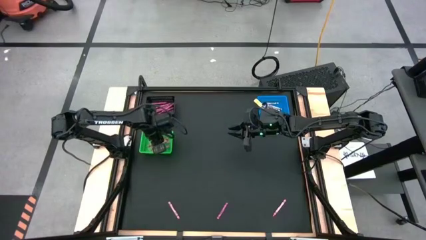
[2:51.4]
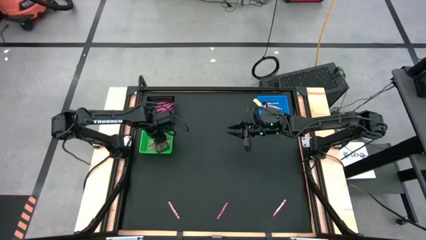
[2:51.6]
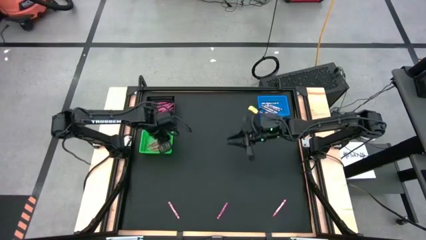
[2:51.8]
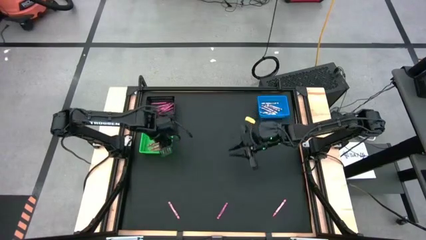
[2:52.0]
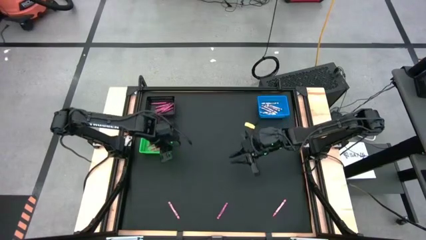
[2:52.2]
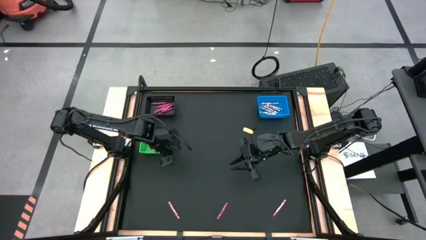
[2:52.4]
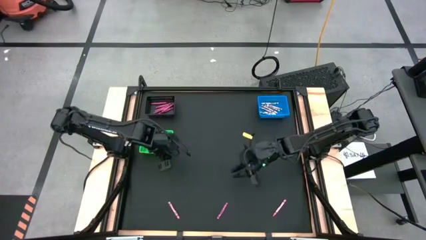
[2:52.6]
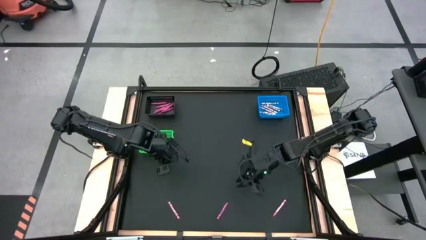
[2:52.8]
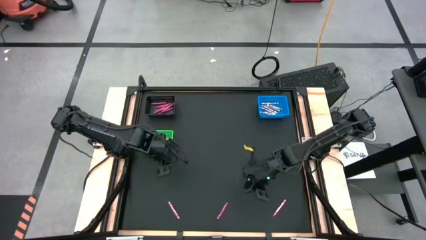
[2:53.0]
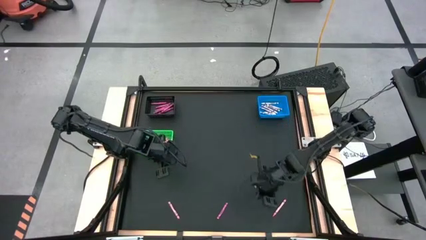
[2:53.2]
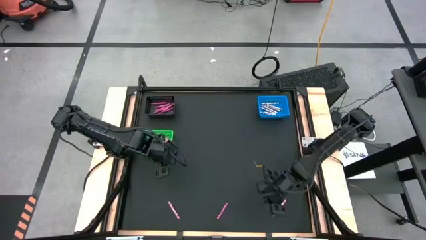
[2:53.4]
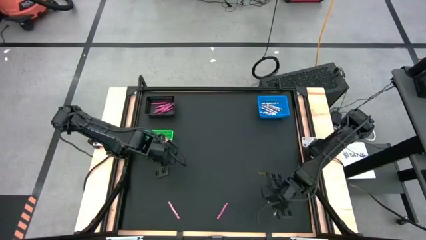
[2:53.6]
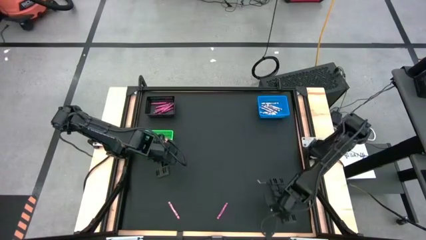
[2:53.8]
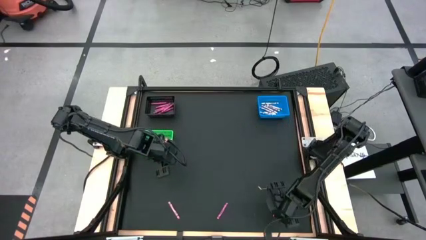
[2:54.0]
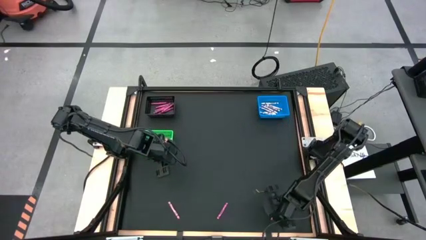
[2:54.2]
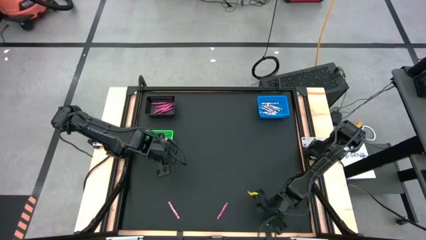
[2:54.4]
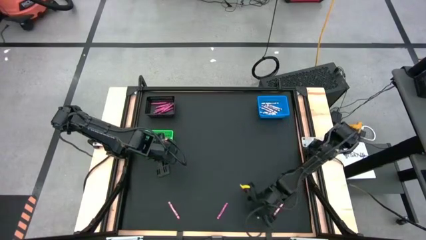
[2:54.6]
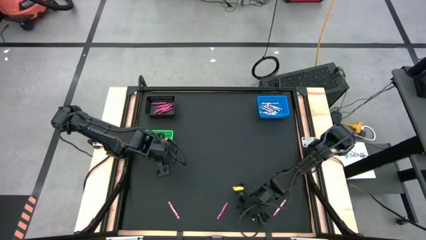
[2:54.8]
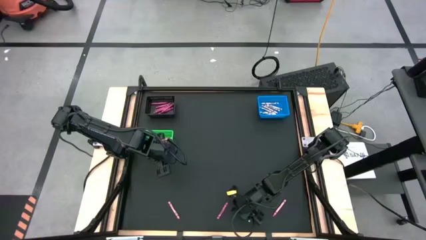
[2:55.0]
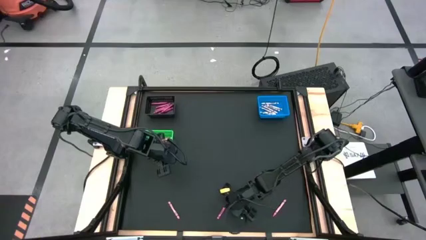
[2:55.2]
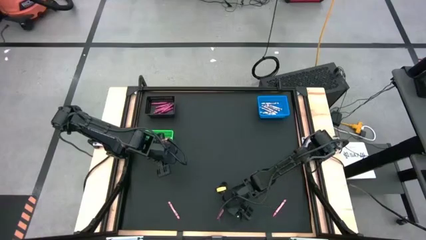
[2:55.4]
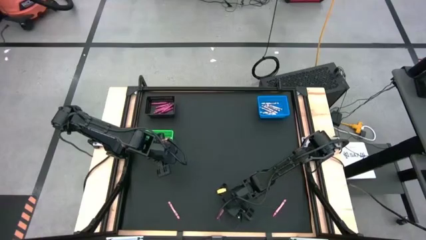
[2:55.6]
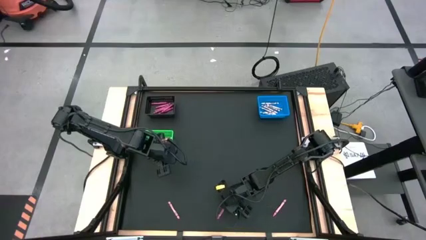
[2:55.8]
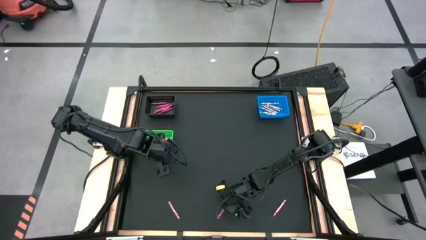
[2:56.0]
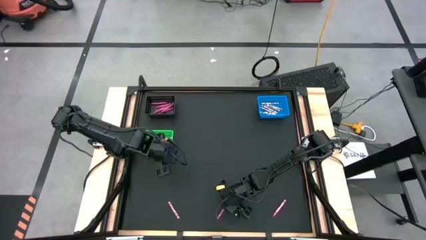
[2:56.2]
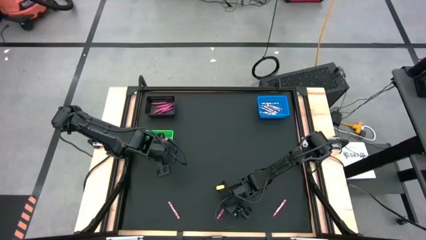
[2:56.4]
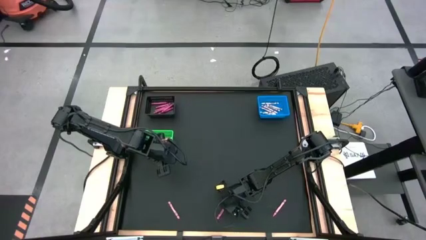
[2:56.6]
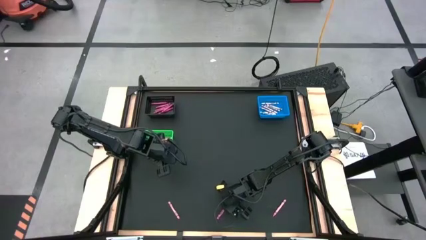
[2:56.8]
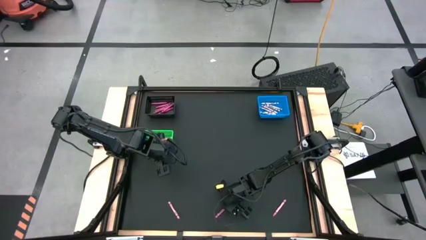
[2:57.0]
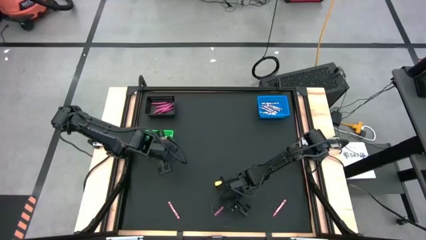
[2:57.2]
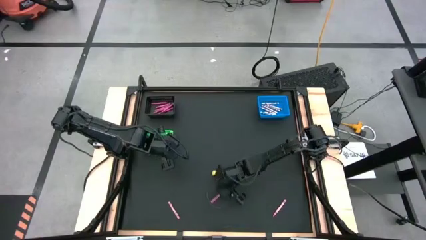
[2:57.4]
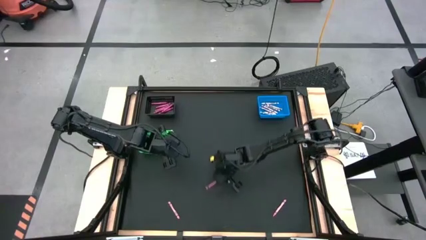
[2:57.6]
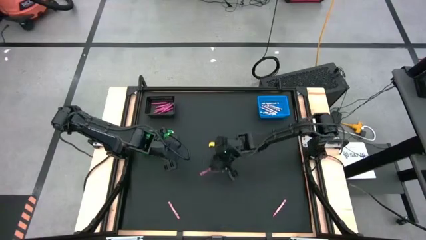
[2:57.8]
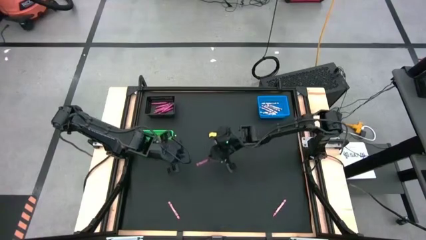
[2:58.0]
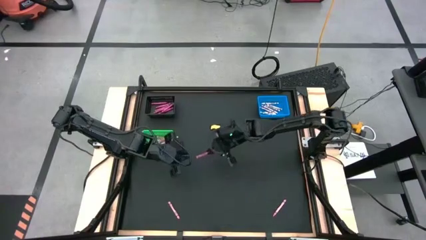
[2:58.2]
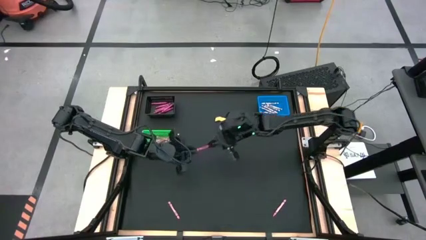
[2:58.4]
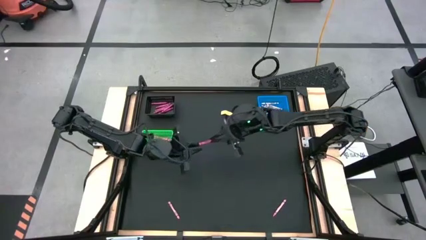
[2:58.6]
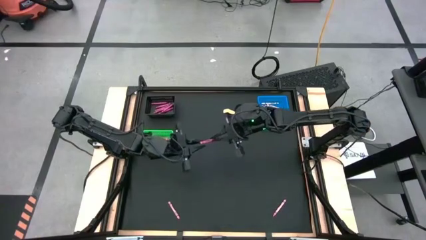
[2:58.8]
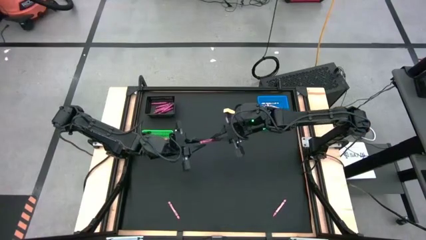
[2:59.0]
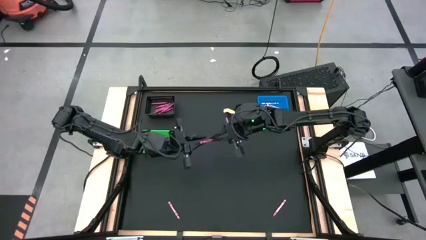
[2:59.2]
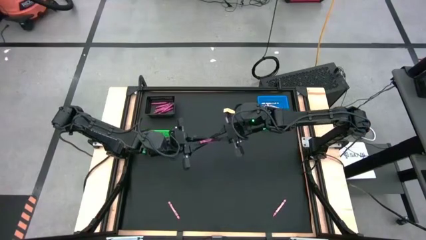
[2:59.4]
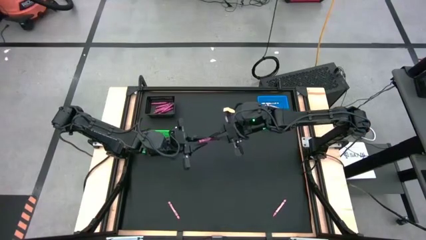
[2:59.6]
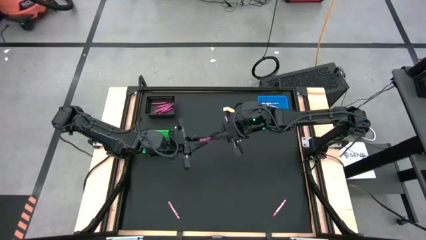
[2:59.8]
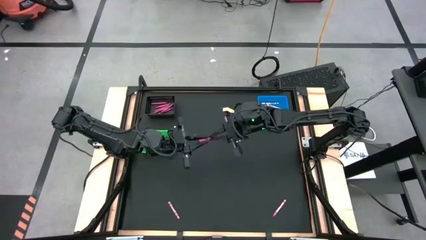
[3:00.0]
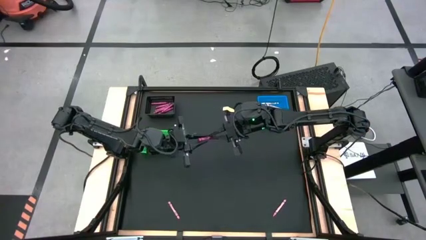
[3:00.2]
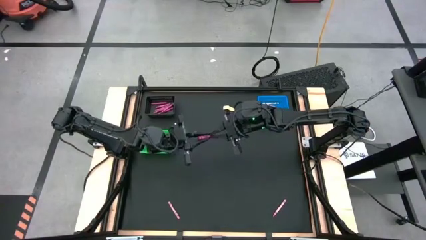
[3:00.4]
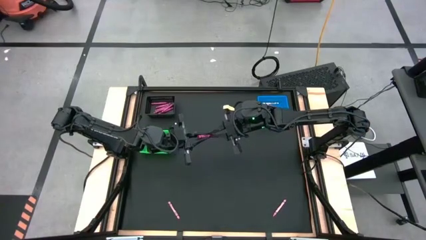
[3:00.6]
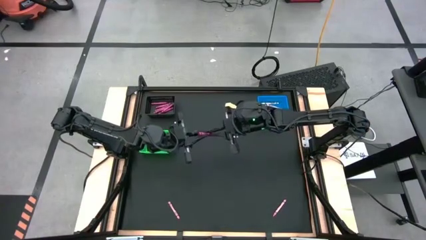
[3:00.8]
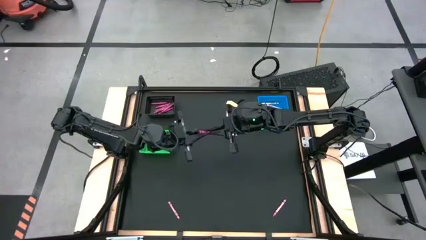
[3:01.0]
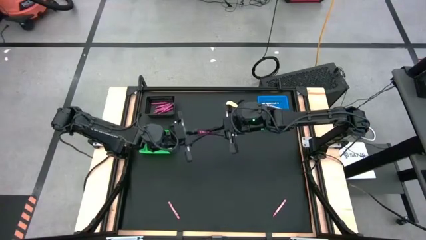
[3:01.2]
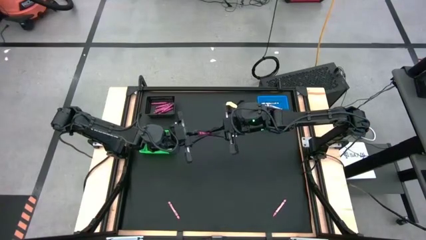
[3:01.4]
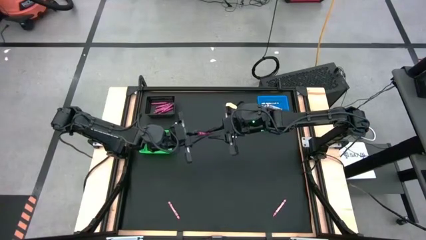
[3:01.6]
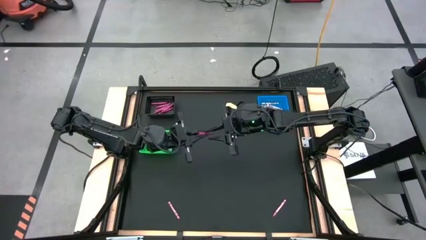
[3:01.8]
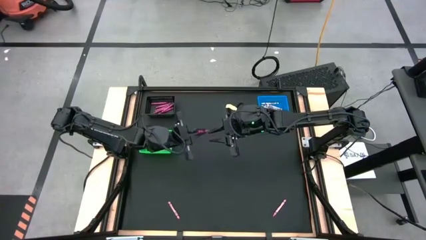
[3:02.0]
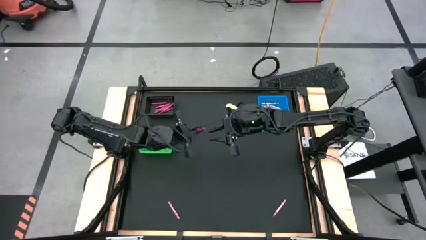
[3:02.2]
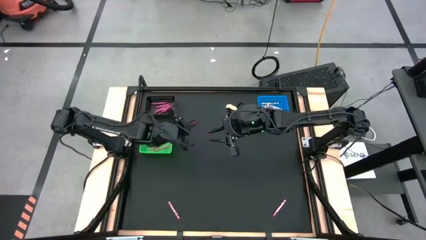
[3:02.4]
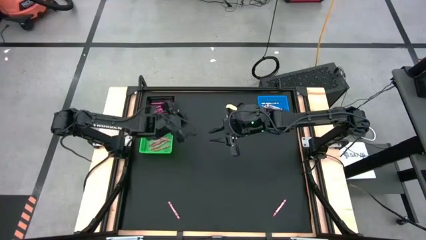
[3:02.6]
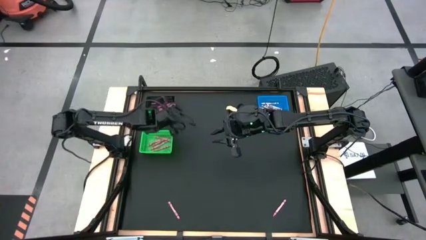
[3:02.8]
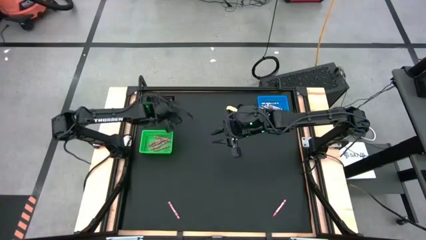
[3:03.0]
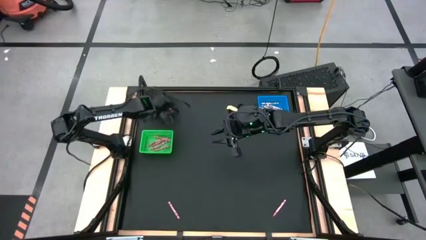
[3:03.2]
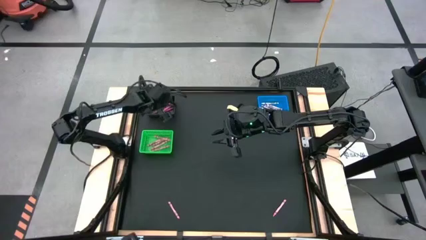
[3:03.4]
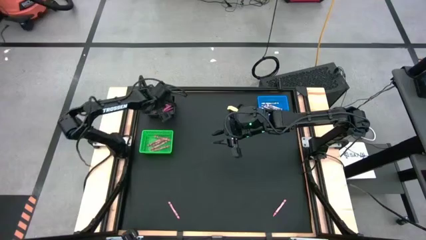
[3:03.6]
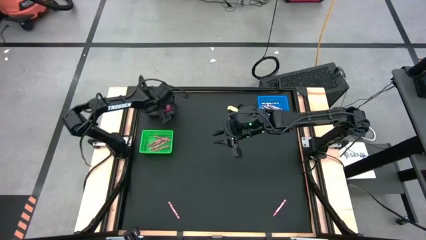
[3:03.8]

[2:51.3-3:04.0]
Task: Sort crayons
Put the red crayon into the black bin

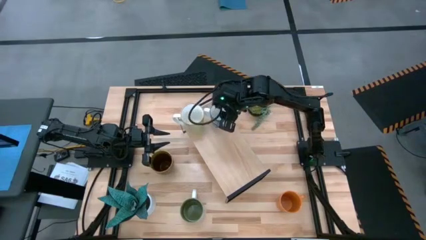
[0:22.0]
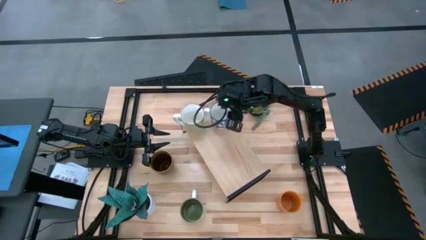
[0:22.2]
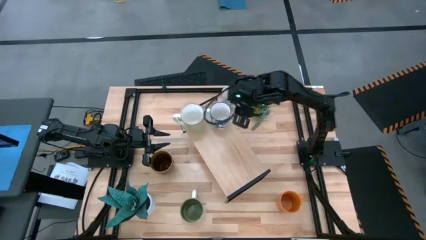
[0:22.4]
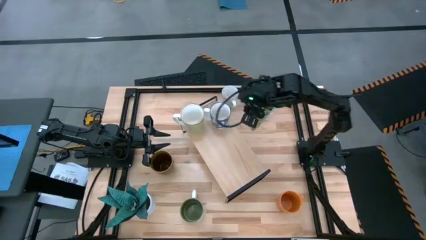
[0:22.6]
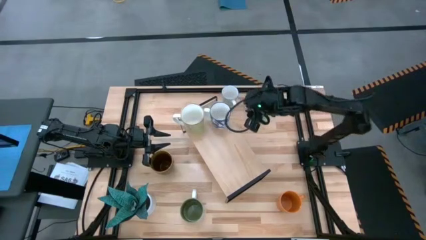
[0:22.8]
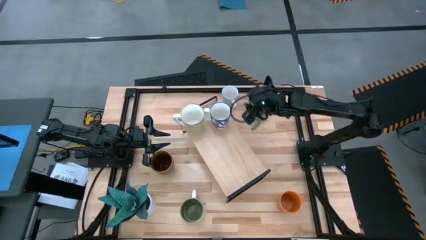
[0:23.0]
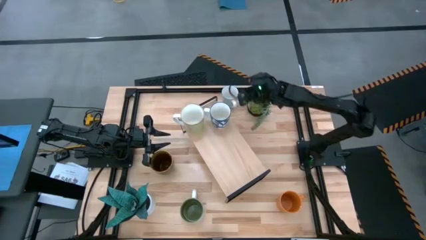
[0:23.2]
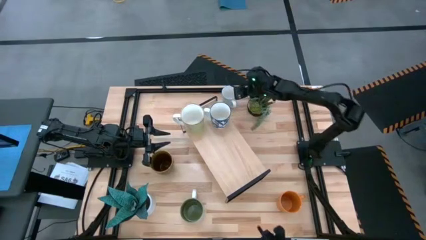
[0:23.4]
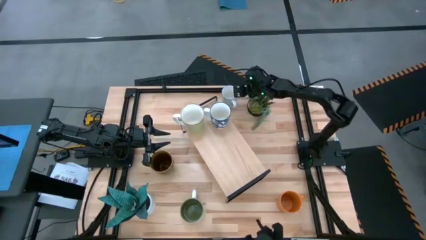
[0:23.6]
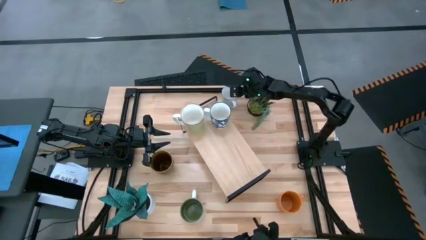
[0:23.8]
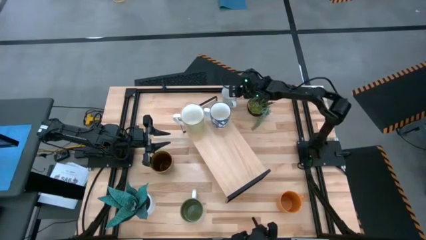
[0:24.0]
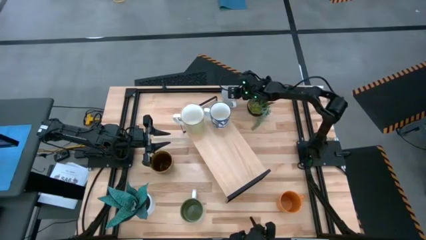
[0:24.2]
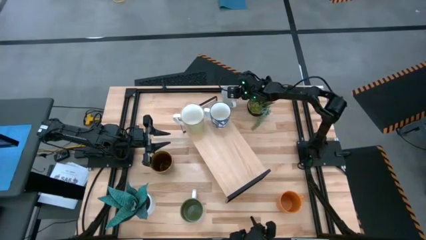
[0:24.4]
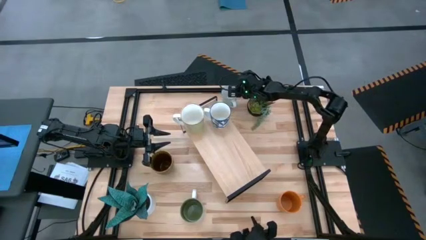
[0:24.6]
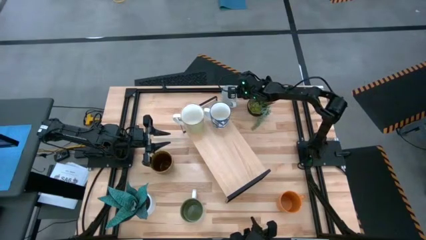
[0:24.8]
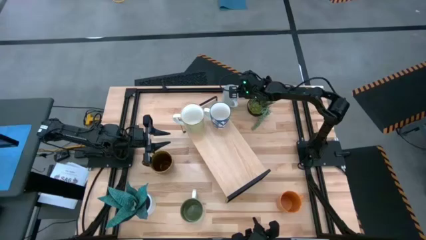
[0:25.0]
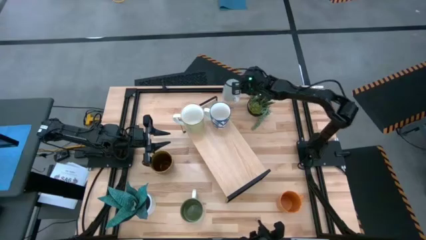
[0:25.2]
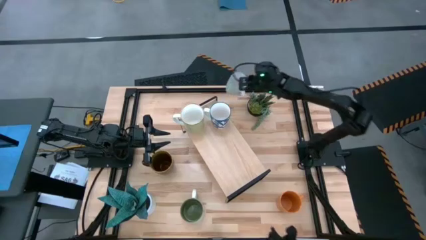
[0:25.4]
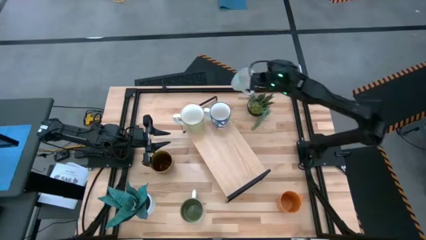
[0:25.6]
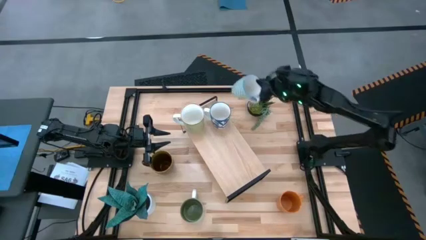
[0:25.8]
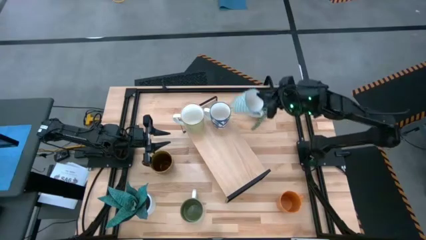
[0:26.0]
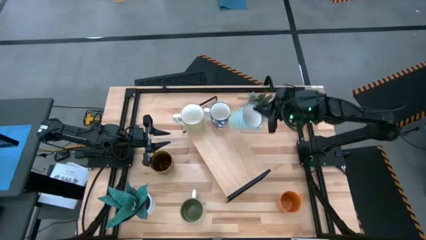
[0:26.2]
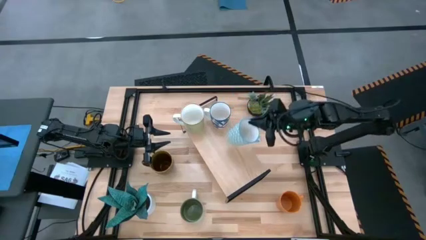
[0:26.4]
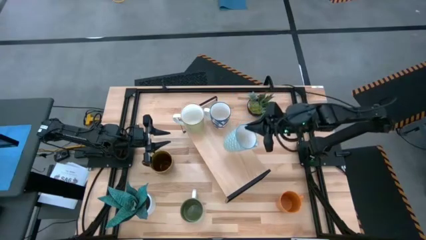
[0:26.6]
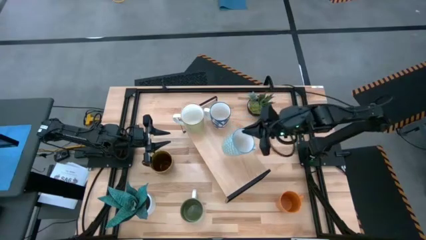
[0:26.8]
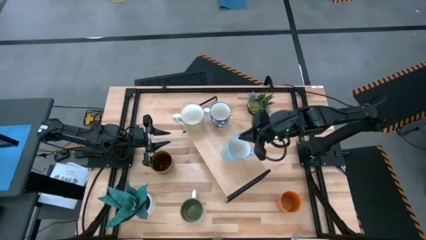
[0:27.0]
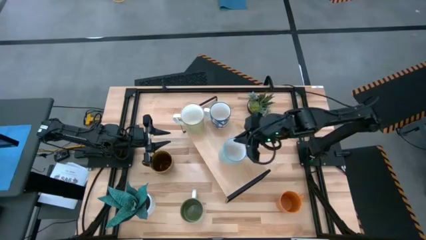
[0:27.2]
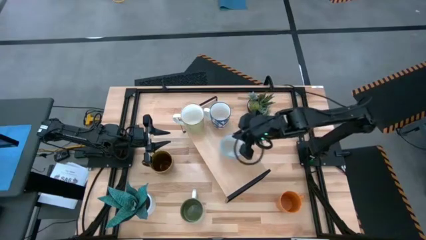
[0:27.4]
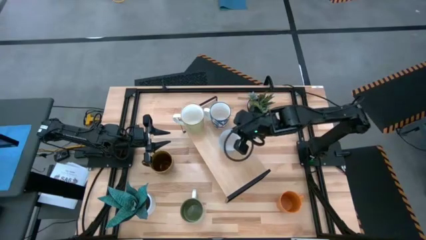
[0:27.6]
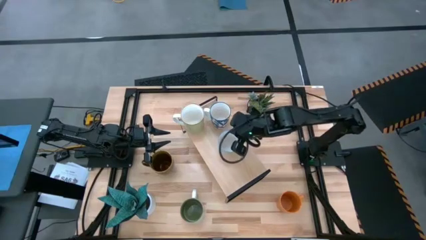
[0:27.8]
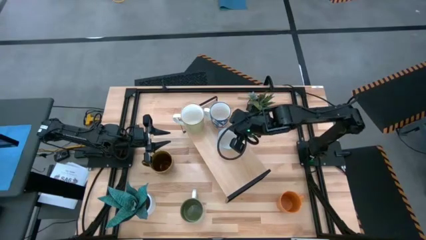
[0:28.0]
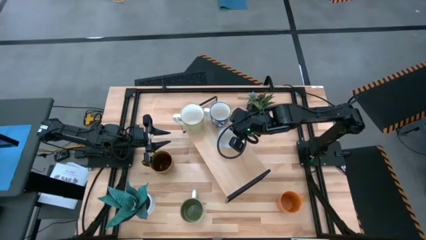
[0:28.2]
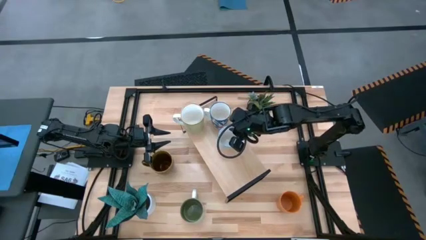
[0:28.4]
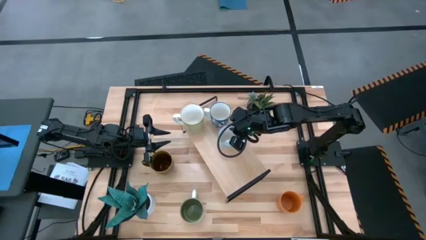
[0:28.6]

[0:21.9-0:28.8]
Task: Place coffee mugs
Put the light blue patterned mug on the shelf
